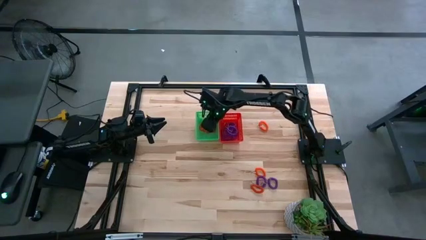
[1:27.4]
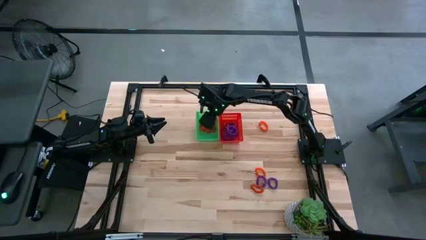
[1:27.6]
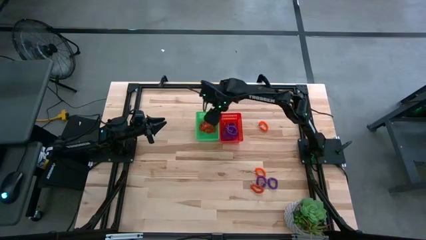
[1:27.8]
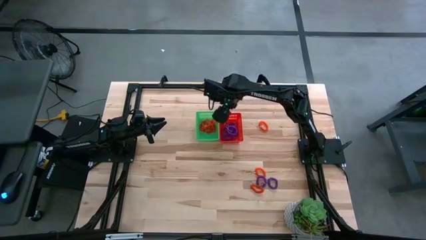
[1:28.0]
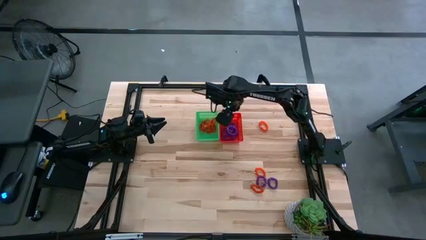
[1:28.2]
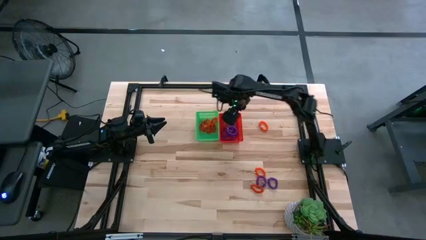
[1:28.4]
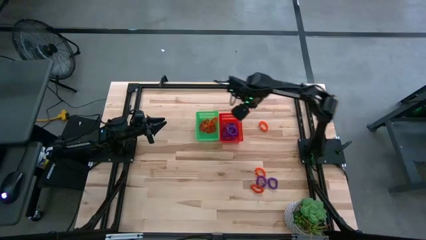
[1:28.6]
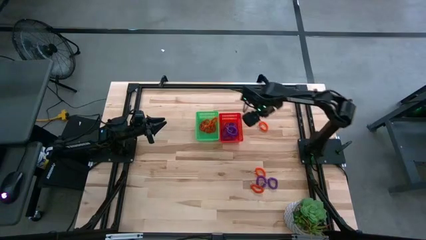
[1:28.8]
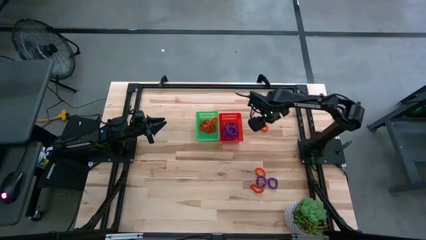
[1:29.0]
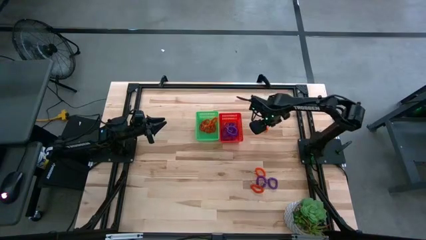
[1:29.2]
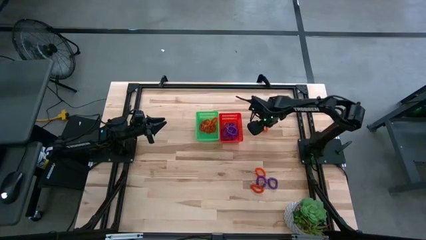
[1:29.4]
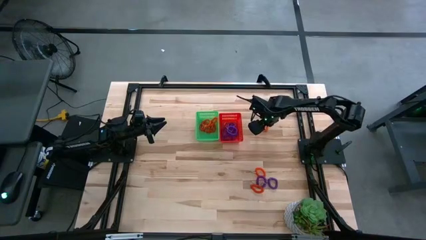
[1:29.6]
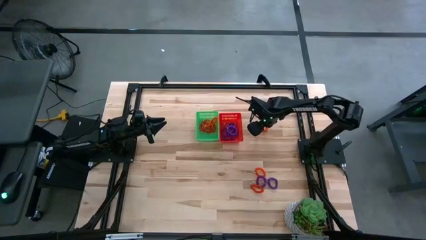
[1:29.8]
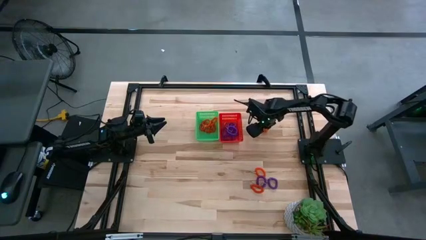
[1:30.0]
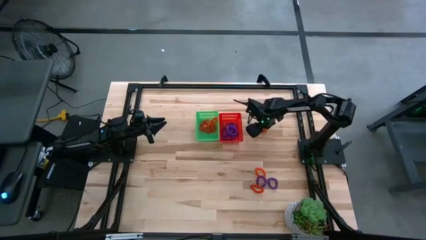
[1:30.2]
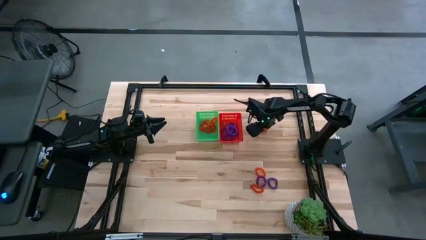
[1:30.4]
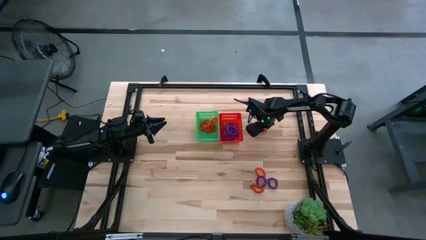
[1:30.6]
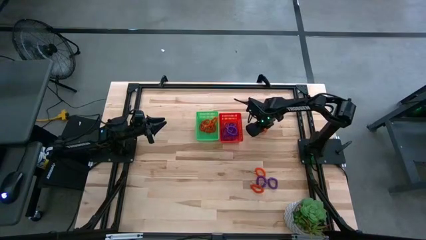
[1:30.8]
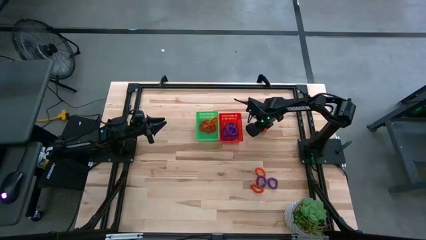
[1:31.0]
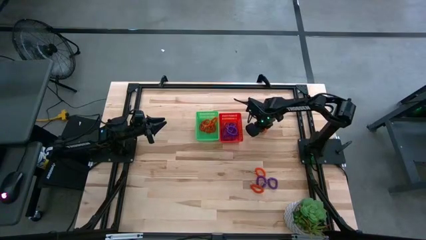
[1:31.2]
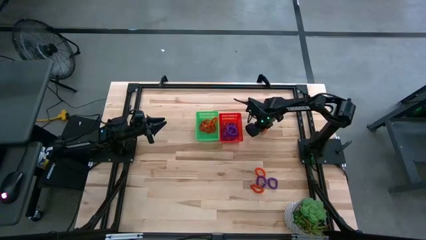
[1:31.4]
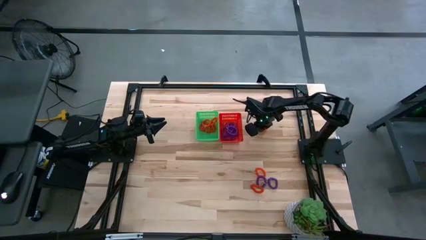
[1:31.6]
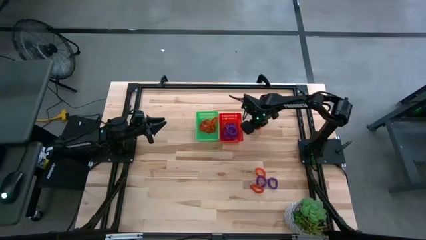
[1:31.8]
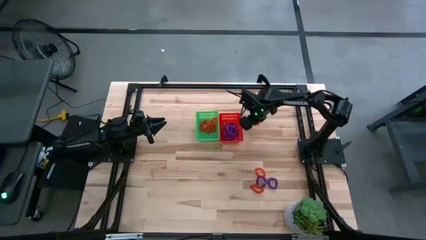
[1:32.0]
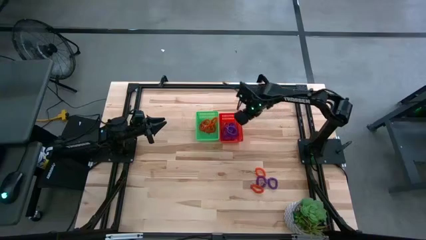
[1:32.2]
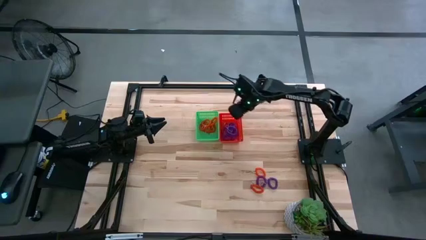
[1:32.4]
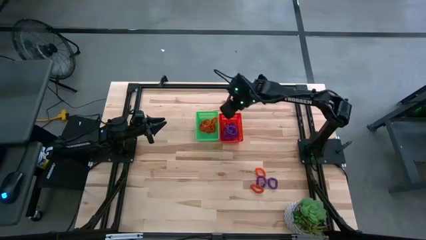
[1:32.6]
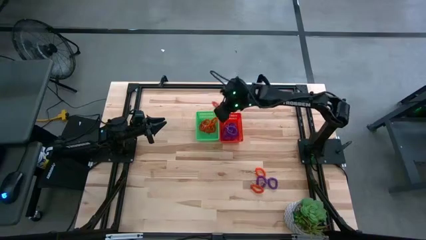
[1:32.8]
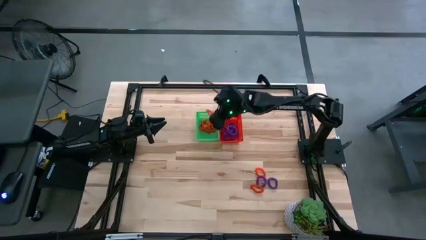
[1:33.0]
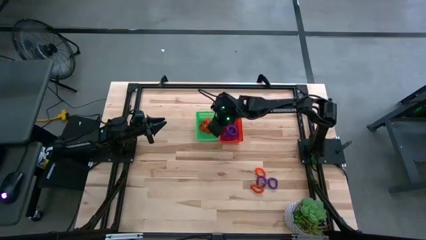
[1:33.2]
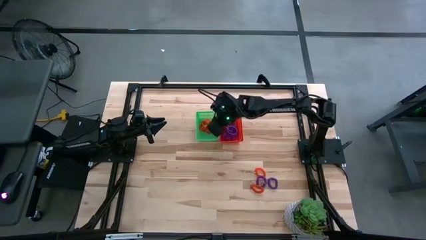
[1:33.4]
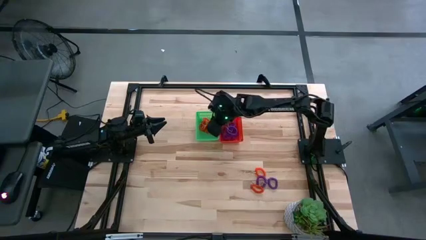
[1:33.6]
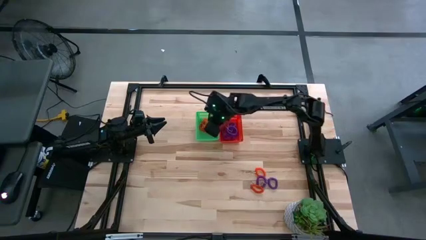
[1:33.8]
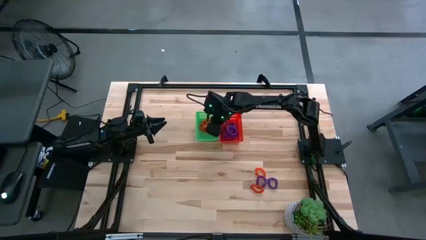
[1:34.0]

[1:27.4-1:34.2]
Task: Sort spring keychains
Put the orange spring keychain into the green bin

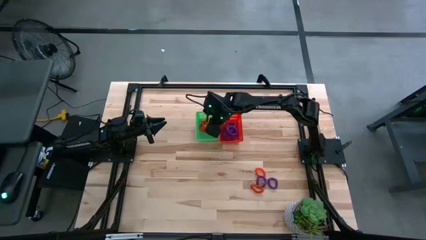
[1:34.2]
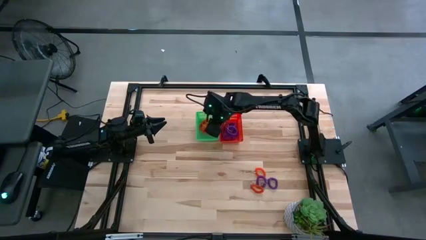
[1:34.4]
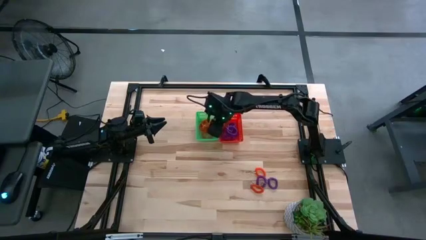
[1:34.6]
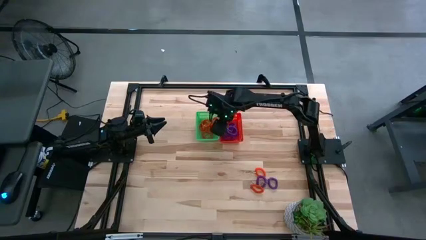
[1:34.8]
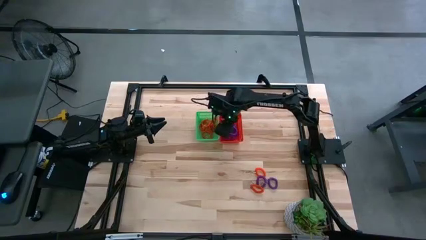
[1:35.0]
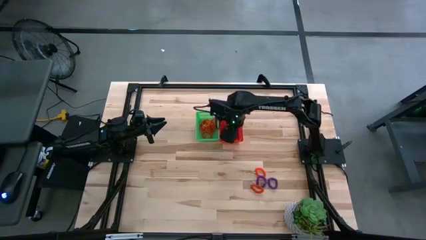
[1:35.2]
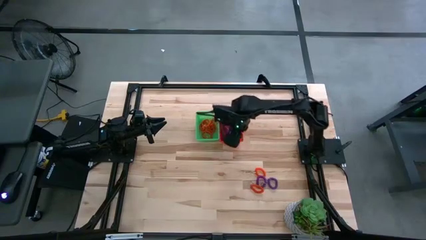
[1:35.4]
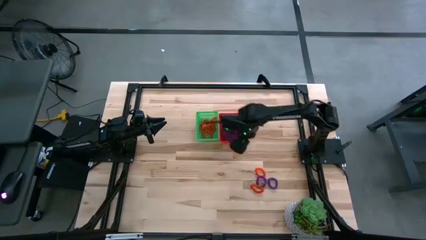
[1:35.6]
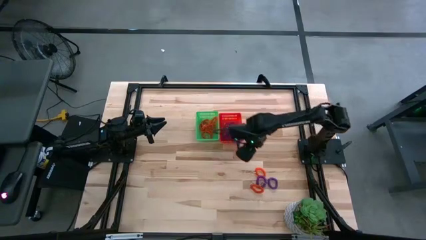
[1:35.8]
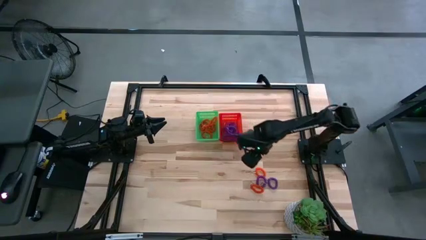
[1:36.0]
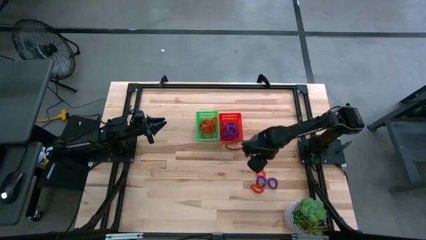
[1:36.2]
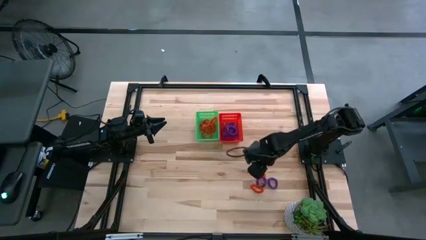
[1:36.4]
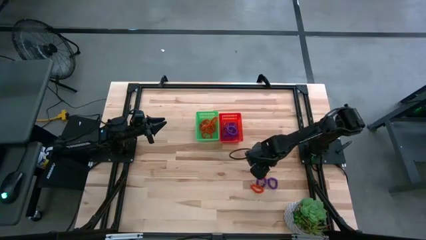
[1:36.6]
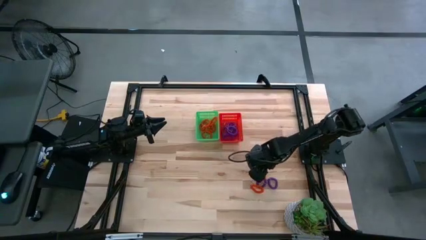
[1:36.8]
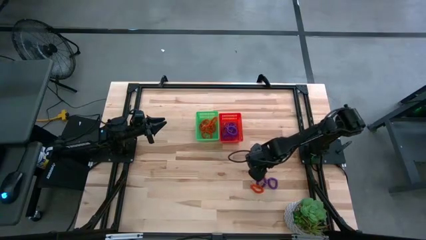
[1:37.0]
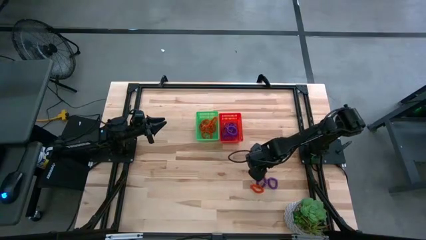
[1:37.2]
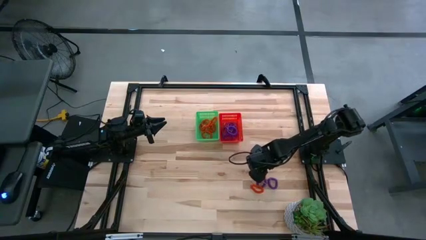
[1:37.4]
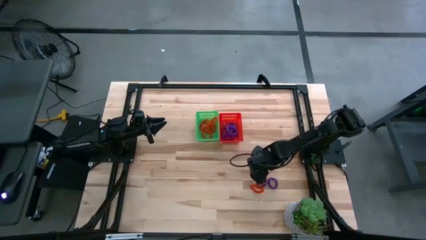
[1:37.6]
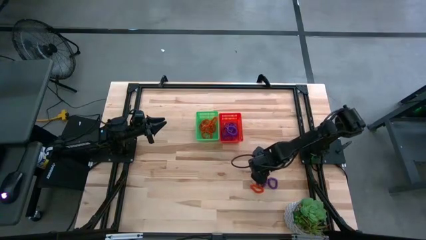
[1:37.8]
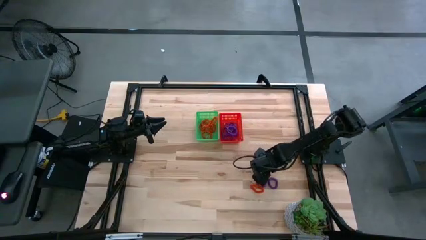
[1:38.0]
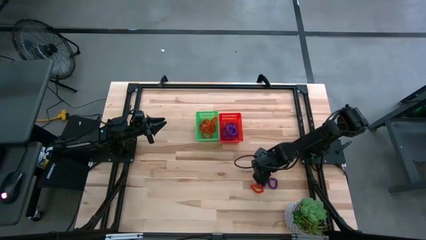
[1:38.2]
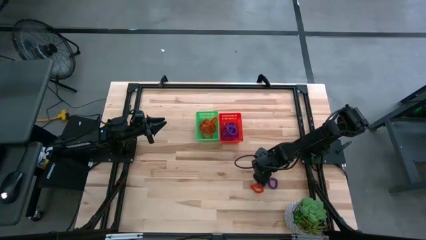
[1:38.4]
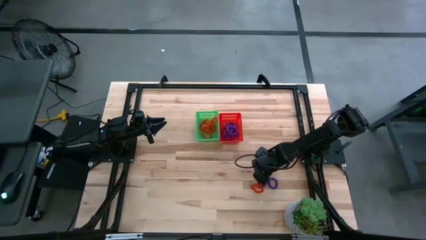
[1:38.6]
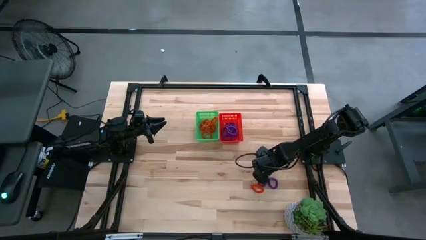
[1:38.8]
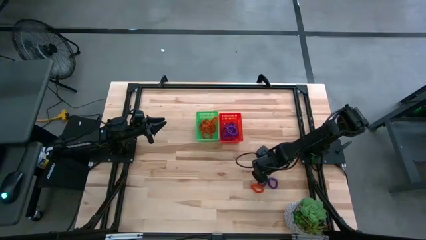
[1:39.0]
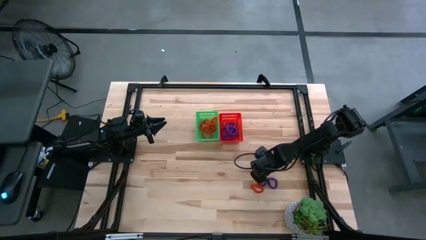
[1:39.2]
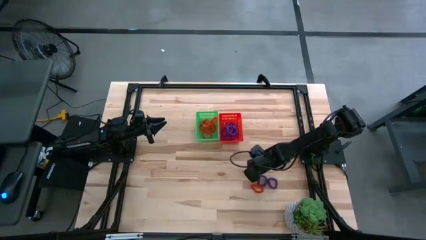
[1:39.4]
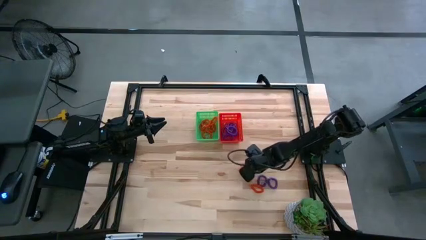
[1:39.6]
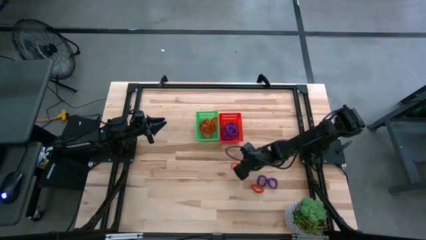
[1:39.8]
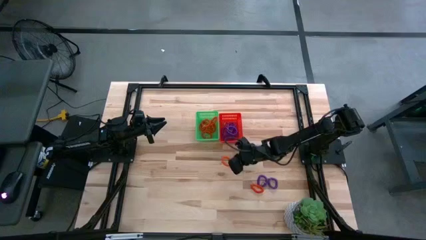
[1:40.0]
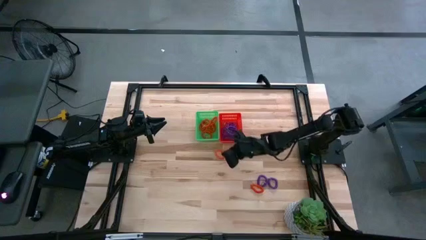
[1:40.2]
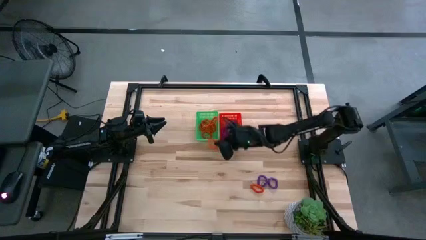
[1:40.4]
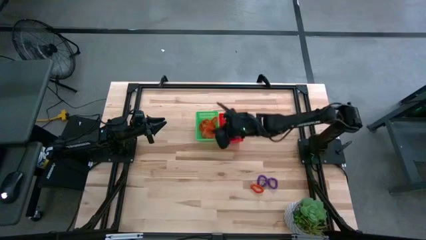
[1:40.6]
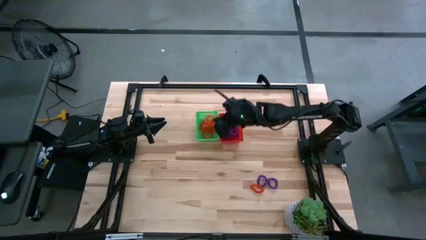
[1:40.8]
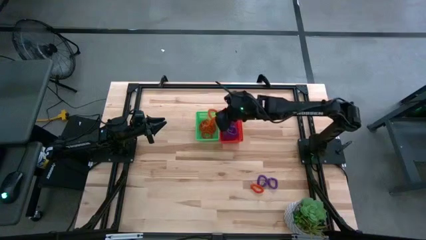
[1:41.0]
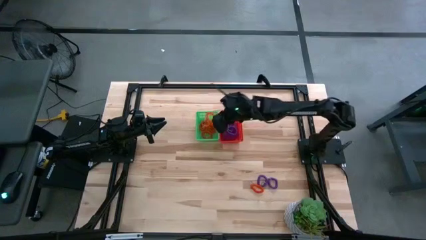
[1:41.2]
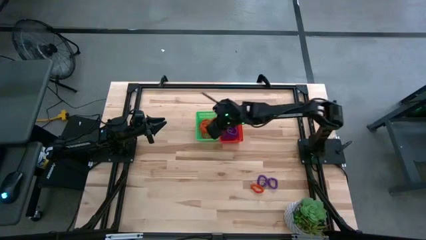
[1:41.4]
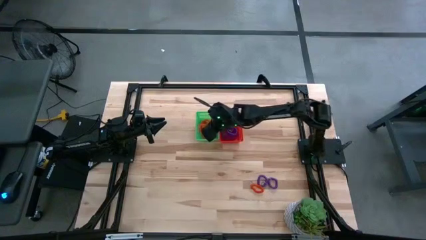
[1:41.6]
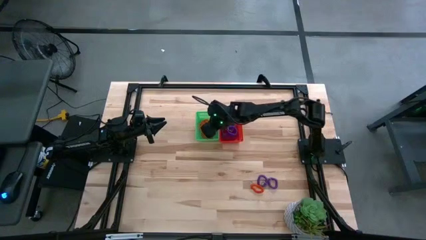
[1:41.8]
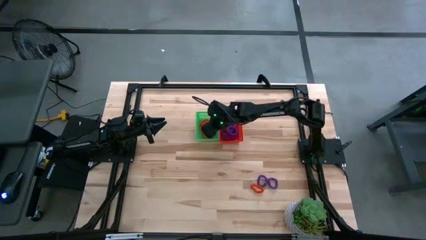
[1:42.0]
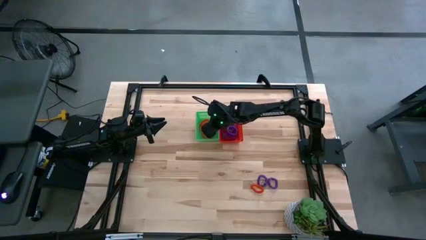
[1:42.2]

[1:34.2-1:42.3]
Put the orange spring keychain into the green bin
